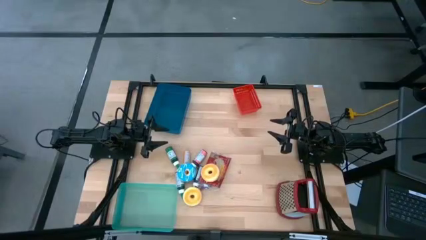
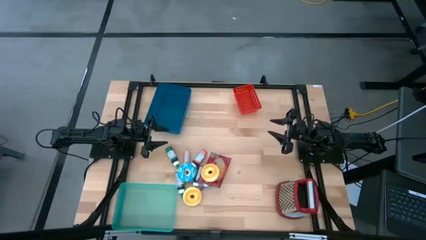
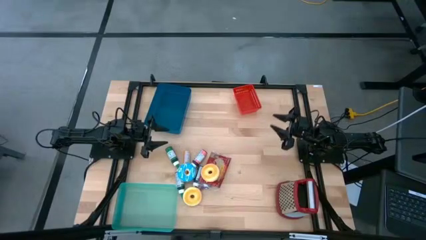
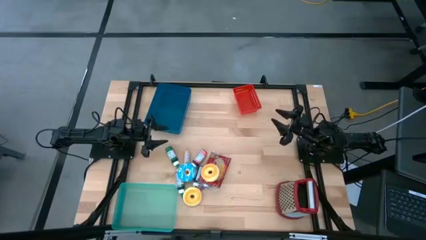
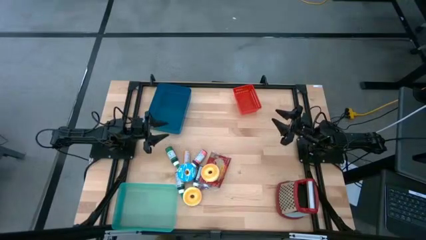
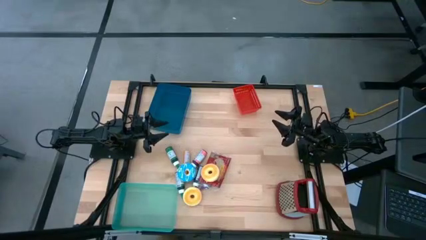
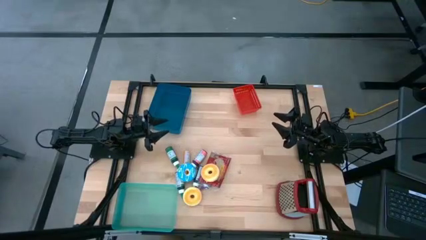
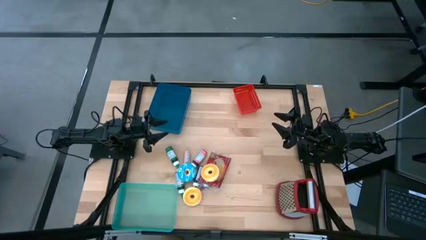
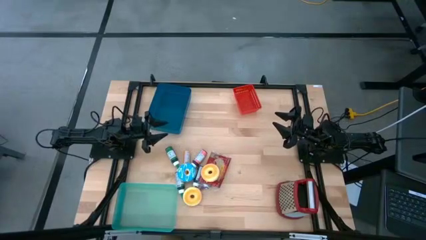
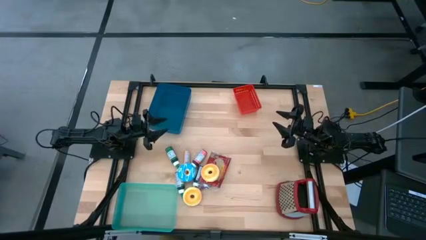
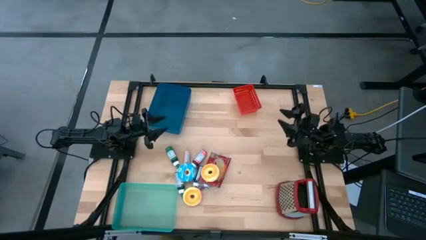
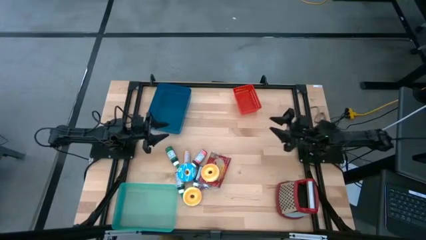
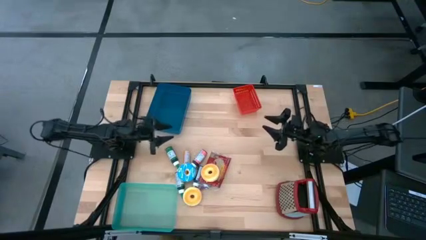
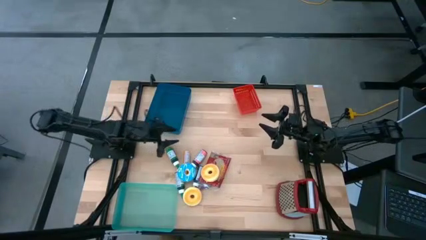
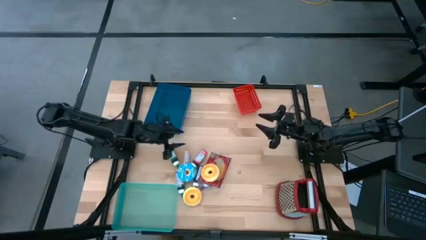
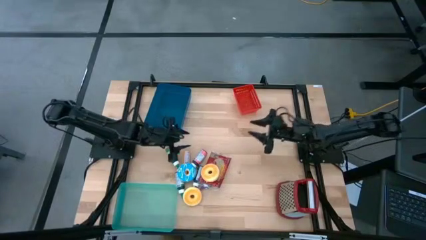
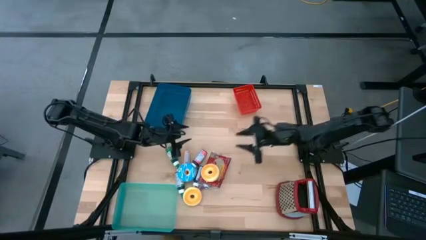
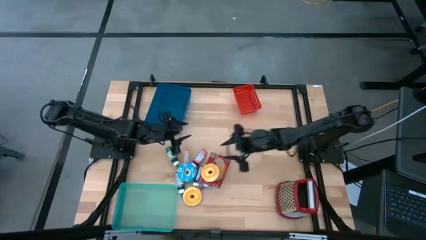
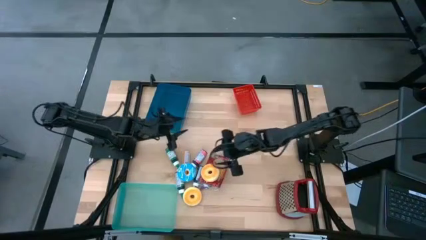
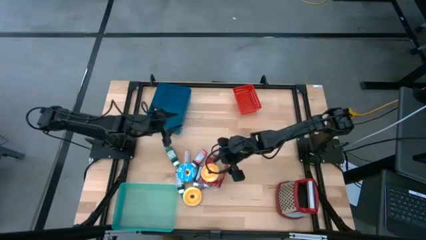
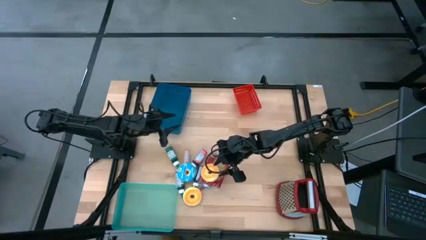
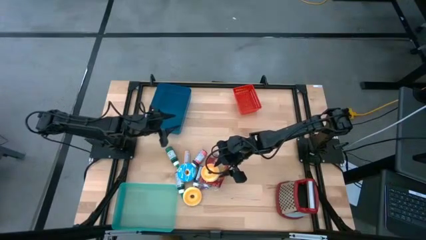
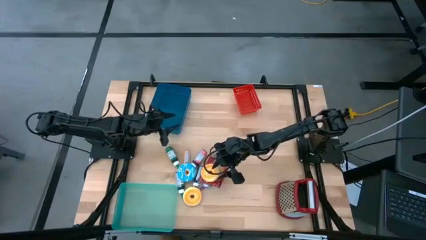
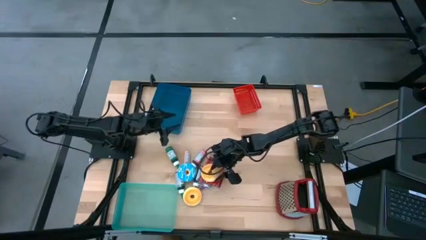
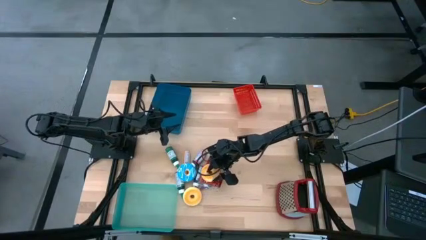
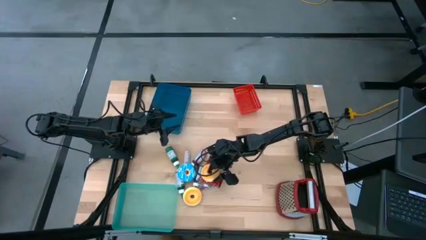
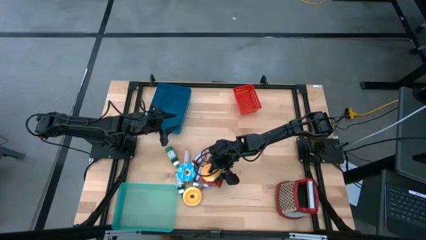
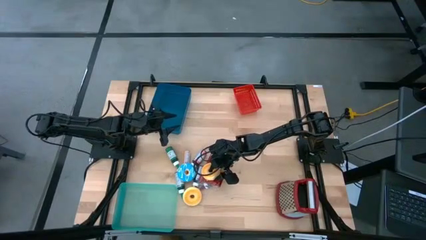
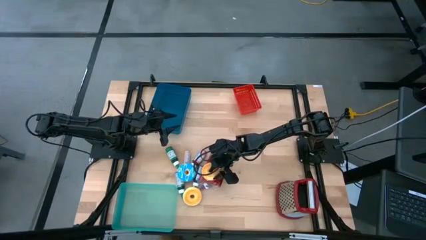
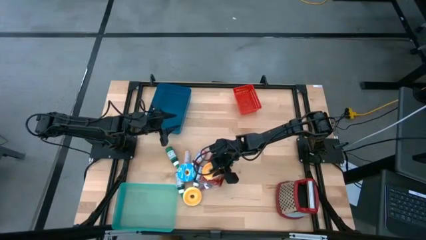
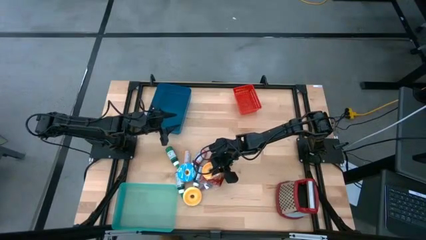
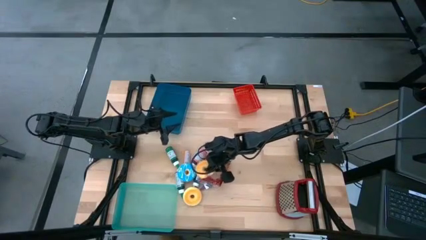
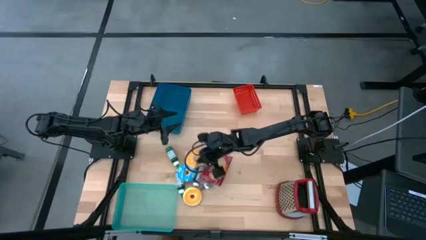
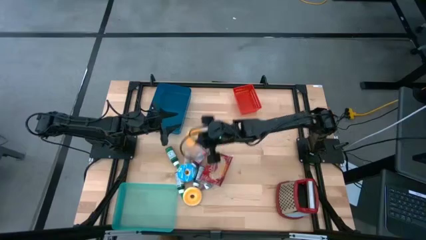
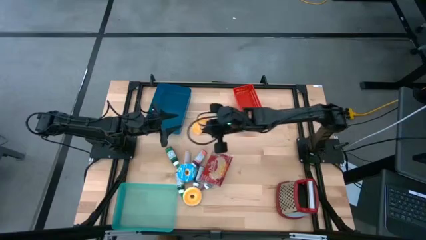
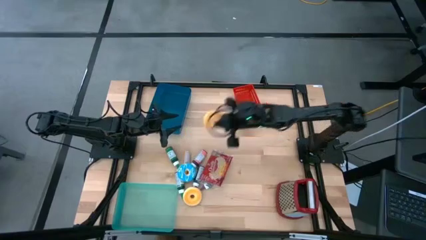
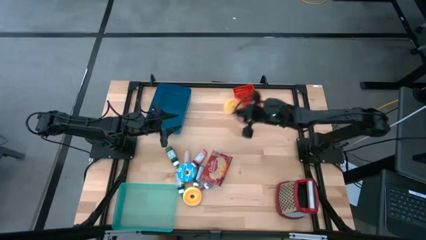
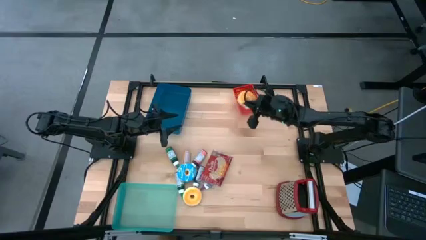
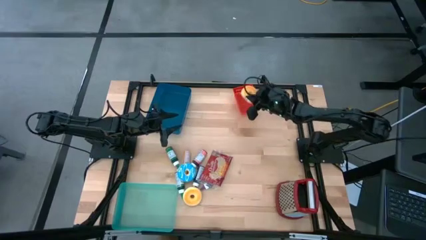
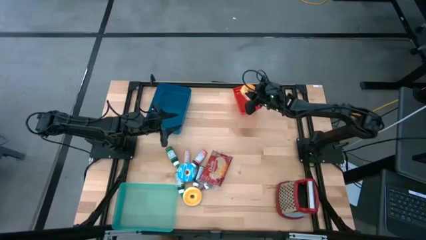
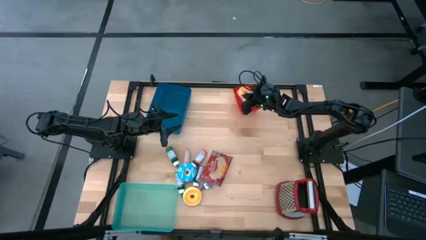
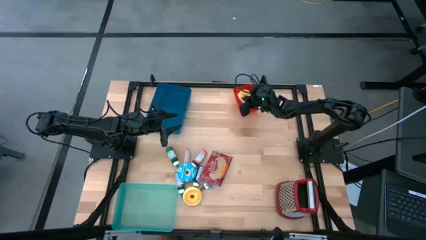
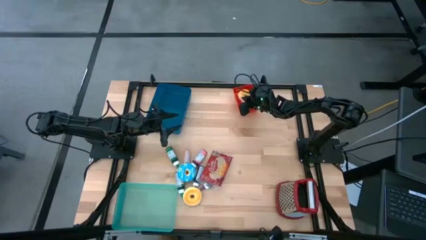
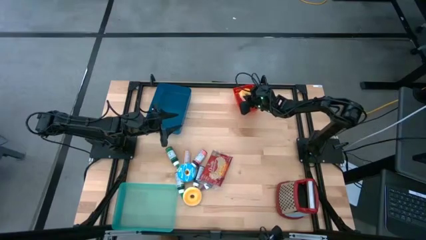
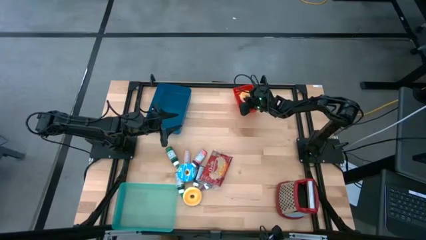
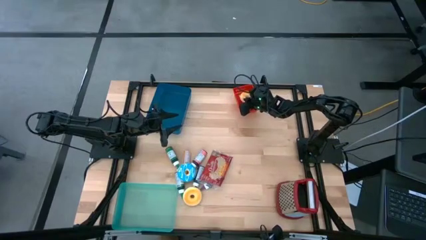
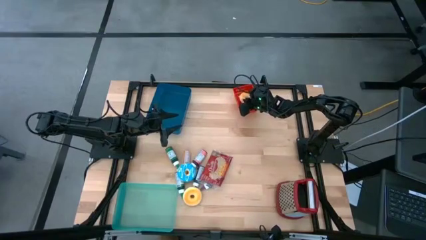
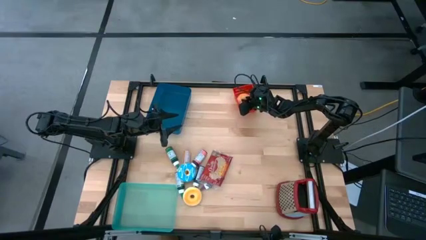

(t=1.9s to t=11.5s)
Put the orange donut into the red bin

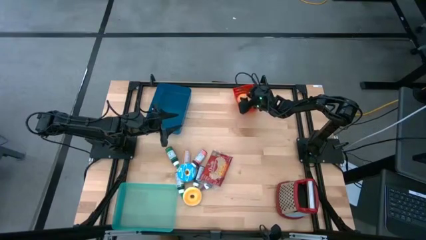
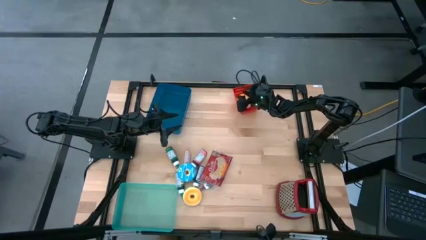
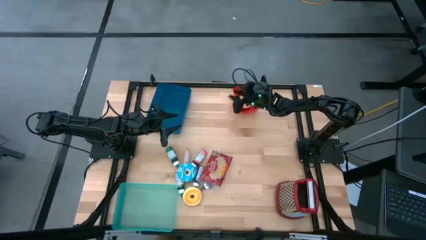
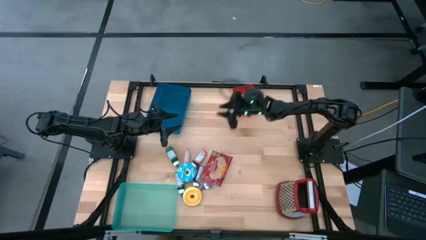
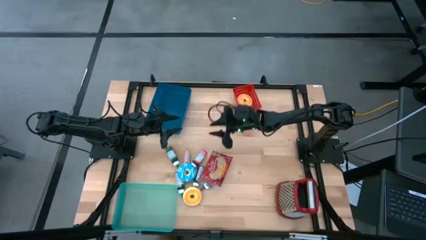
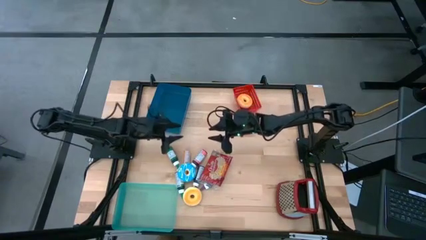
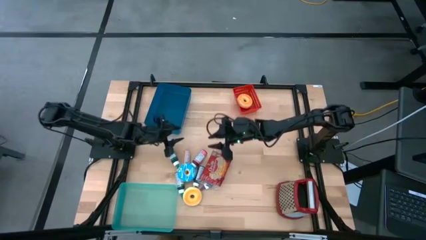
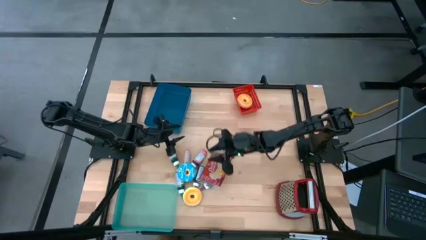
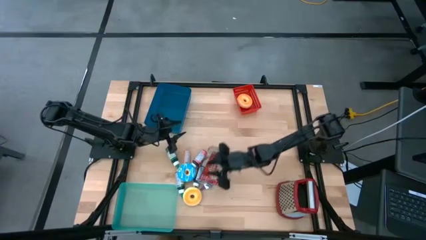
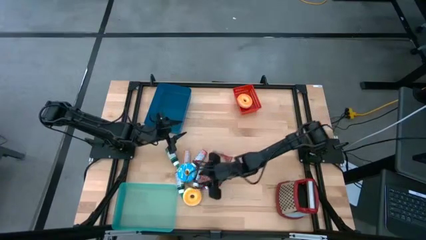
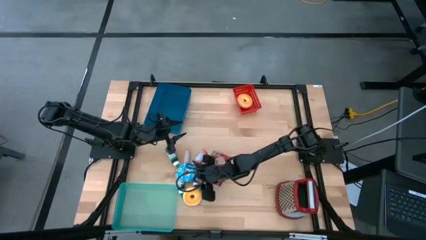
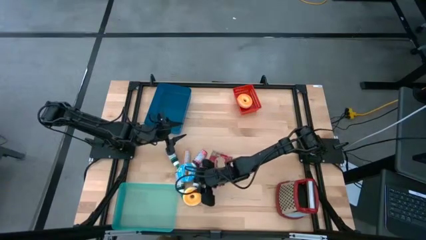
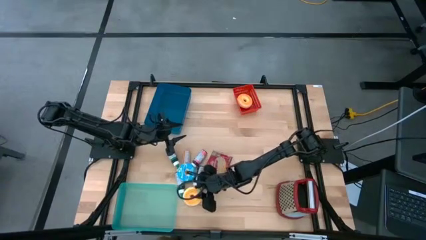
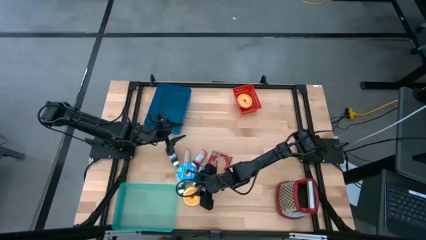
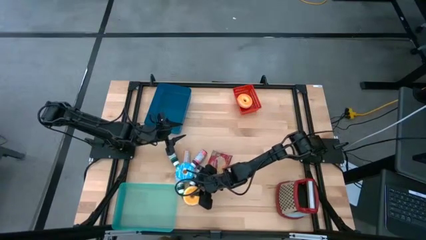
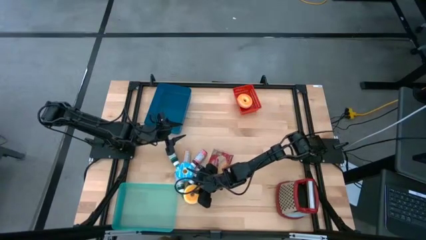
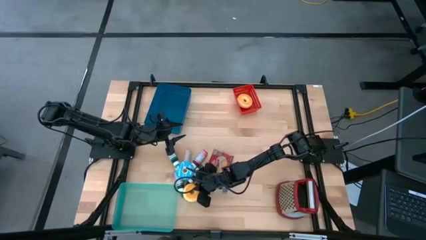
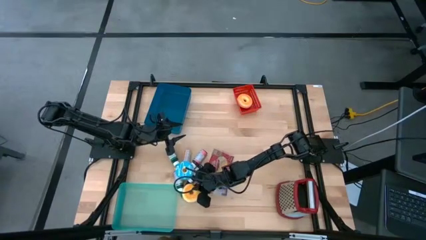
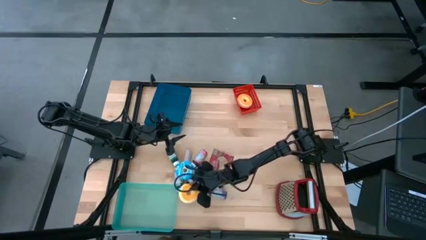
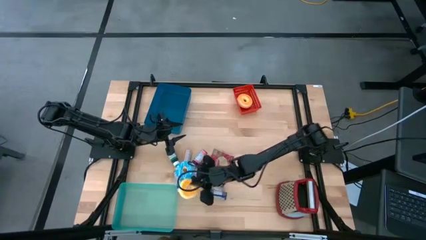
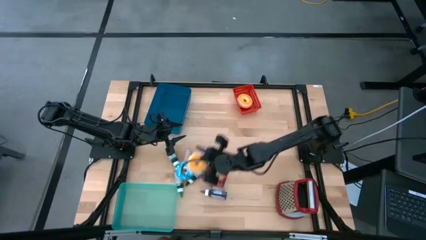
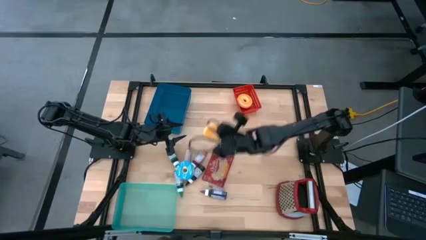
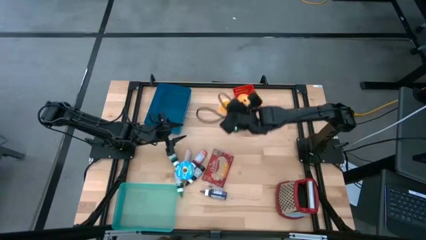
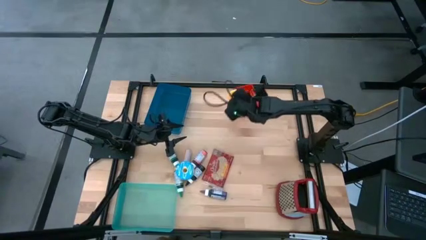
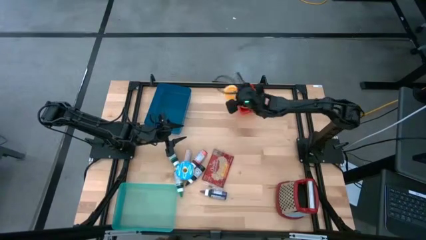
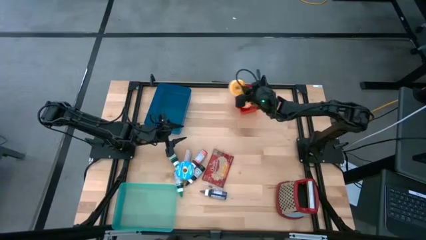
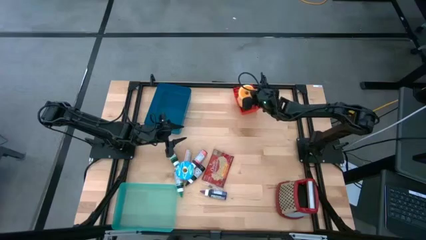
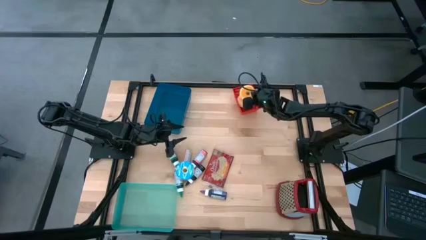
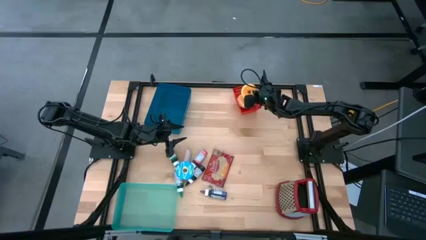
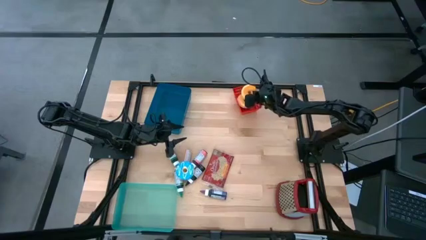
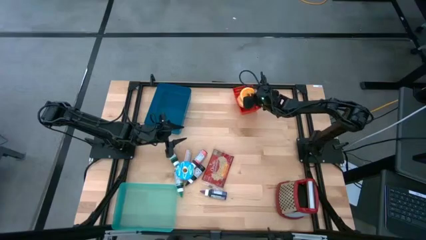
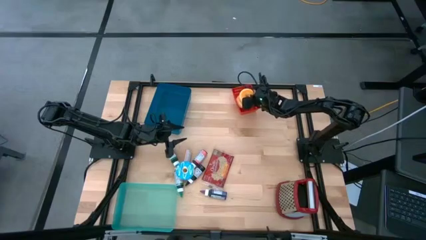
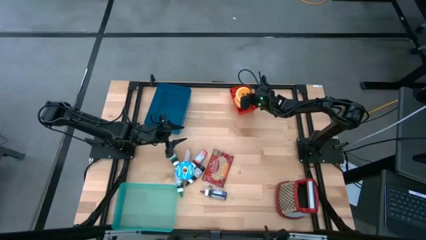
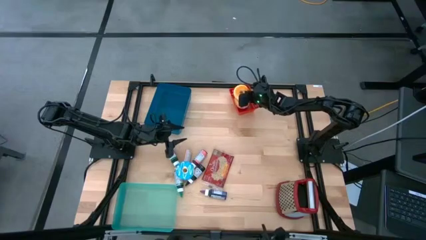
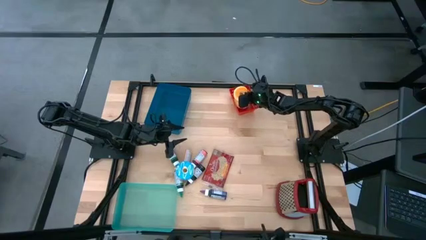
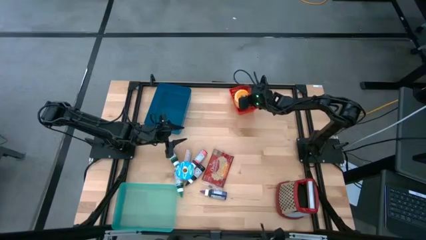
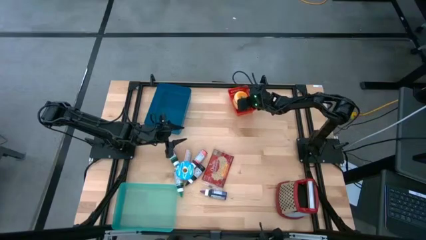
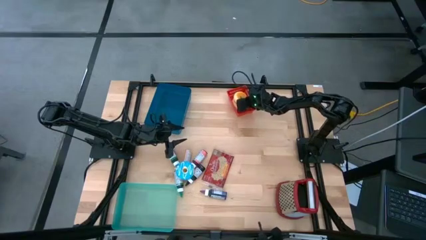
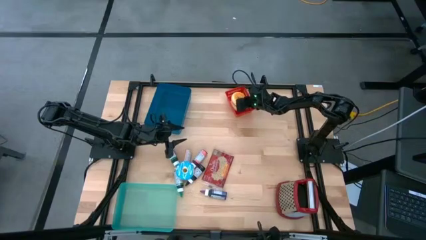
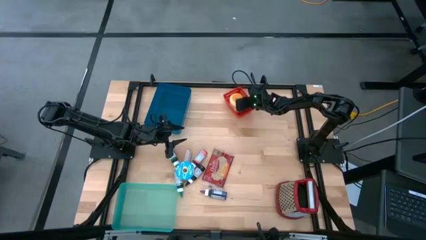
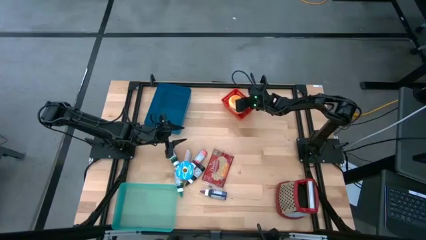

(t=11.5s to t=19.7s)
Put the orange donut into the red bin
